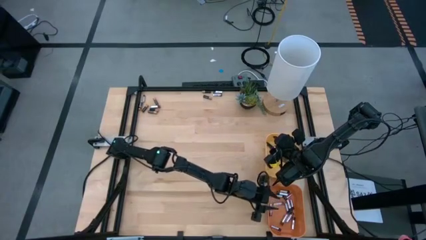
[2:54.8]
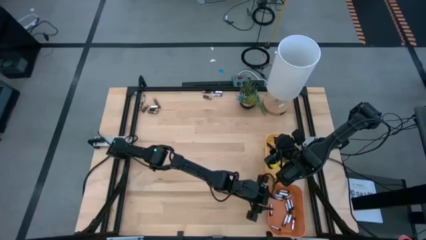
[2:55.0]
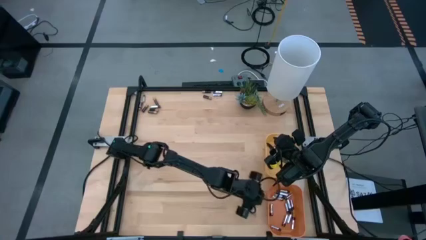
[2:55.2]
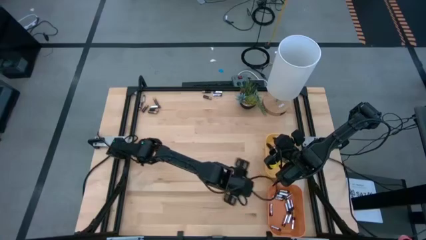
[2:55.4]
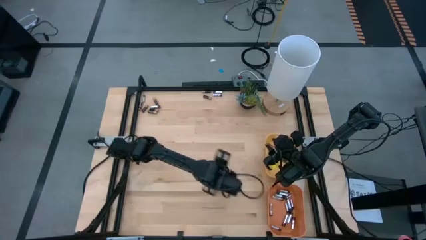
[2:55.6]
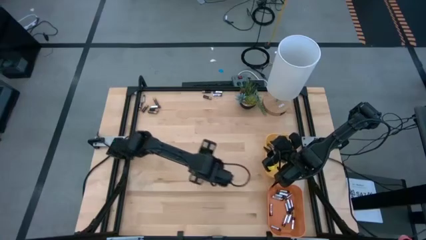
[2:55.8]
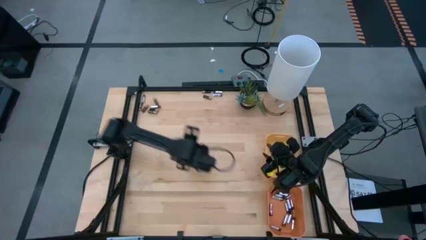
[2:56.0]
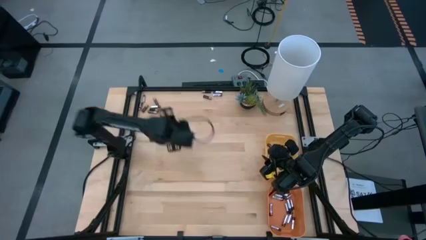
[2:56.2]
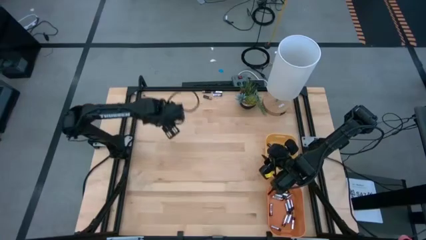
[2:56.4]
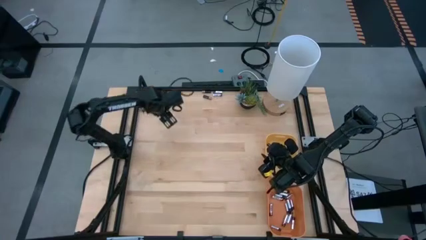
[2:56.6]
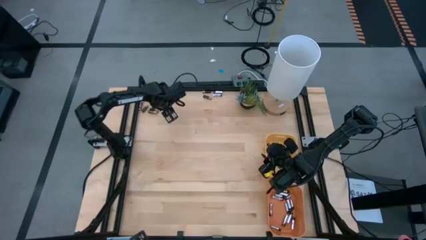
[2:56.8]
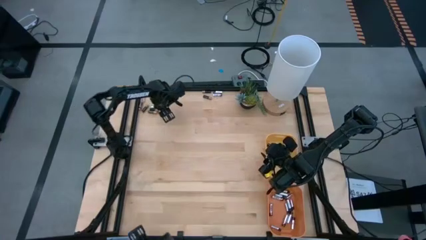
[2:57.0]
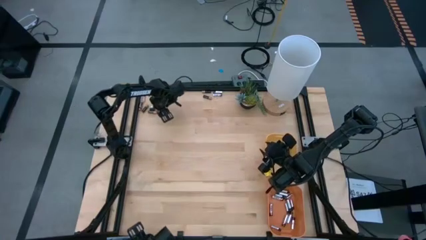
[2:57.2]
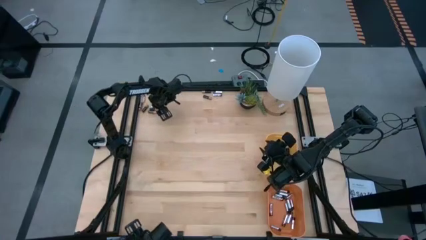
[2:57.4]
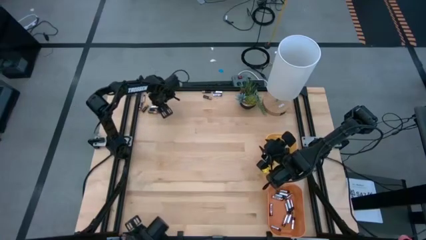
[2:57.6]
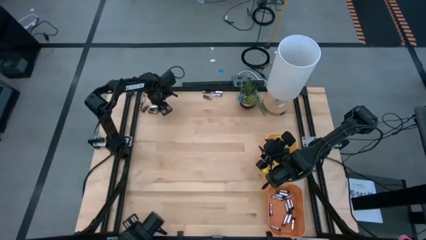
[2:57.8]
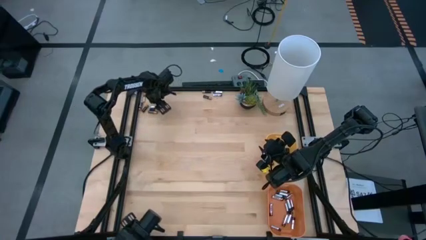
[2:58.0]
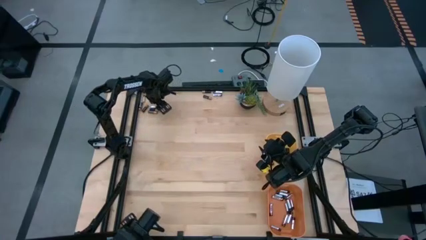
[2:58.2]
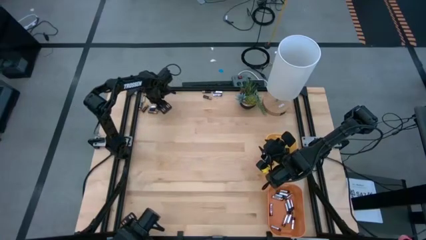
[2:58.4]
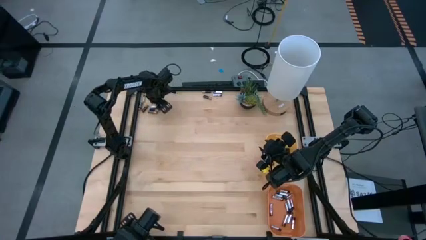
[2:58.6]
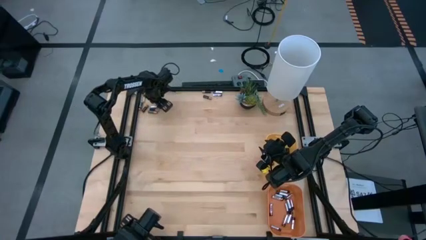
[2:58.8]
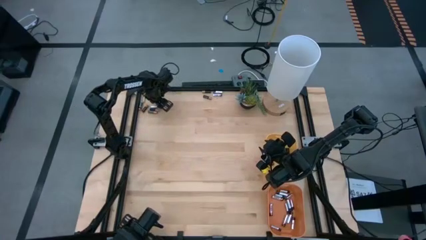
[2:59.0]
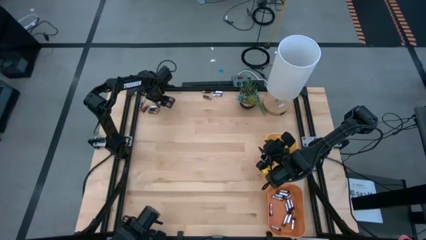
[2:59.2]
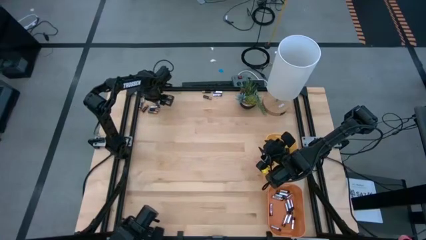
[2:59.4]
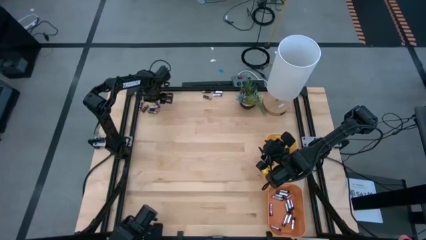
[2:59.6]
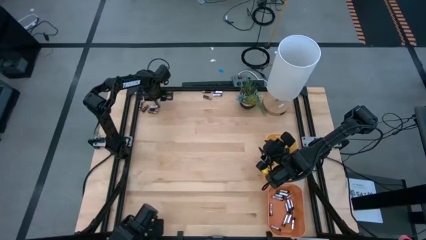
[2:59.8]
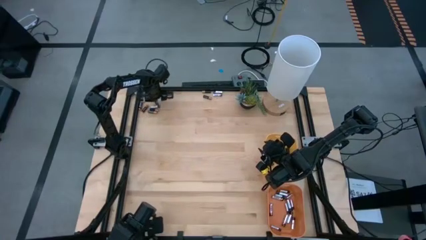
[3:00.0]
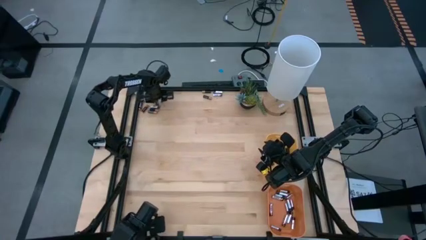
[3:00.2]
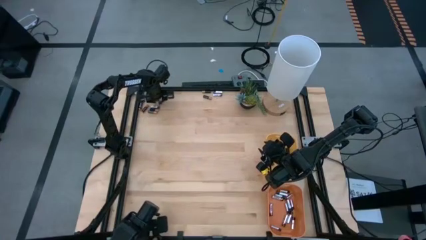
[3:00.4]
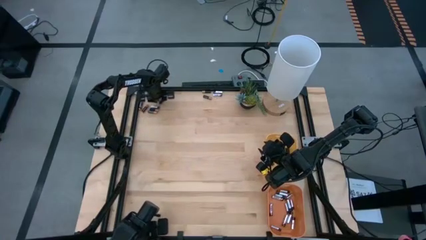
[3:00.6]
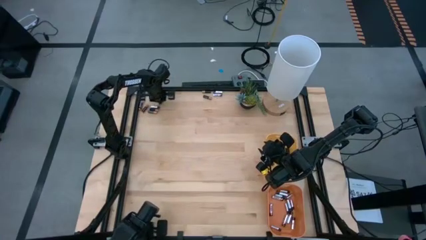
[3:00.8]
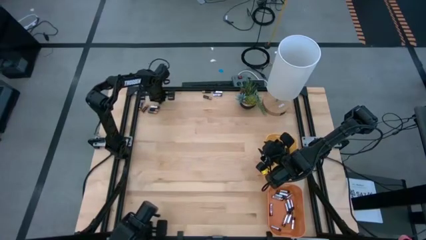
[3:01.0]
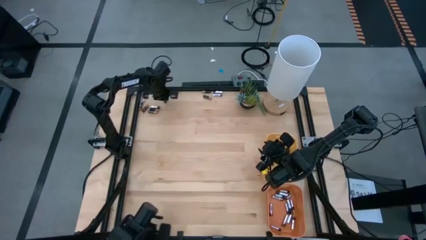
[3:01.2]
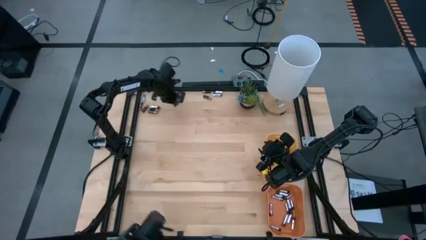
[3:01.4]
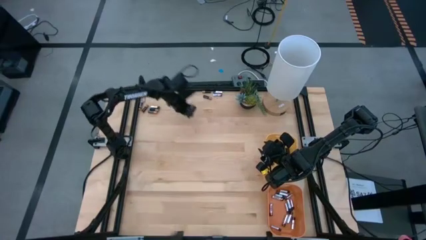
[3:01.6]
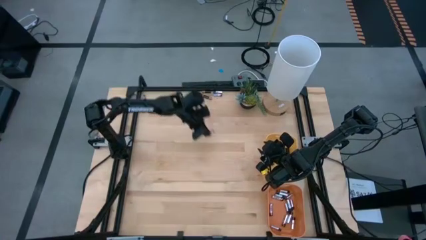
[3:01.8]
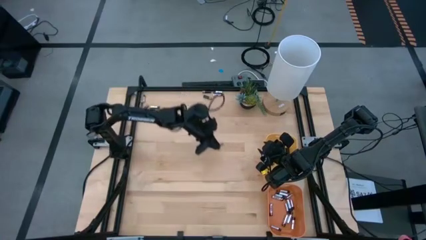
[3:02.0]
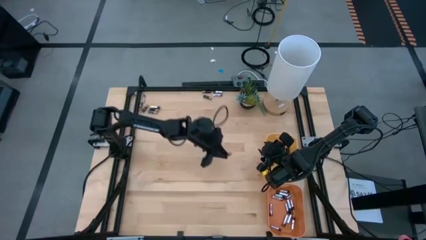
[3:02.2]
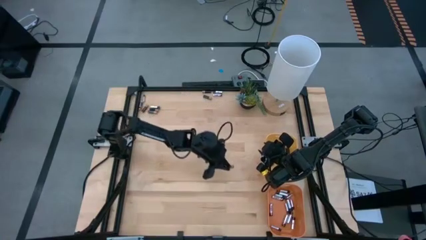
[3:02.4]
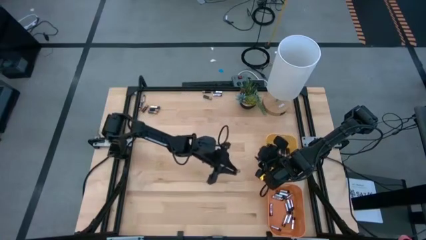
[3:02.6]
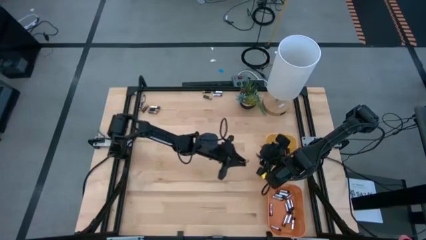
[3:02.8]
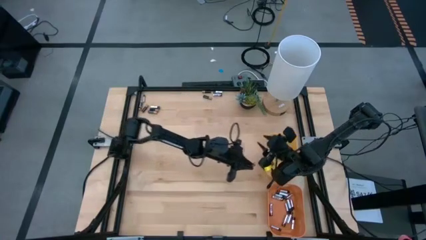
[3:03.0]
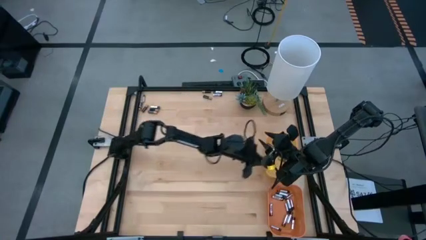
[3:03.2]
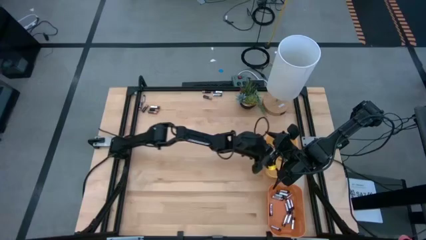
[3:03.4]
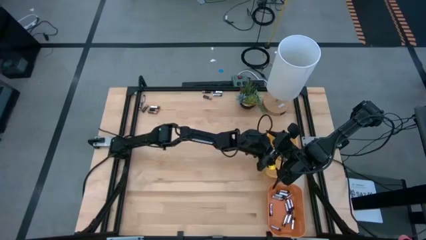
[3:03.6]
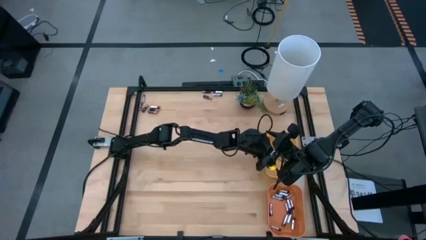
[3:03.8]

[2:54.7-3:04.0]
Task: Sort batteries
Put the brown battery into the yellow bin

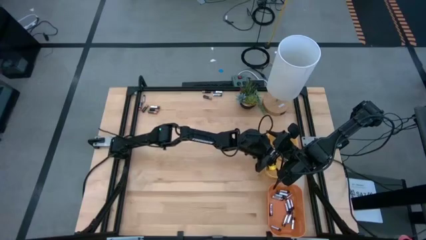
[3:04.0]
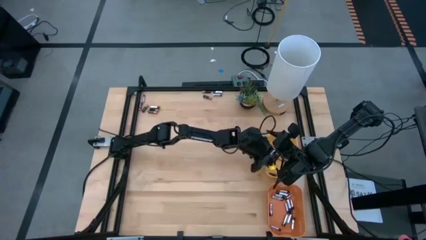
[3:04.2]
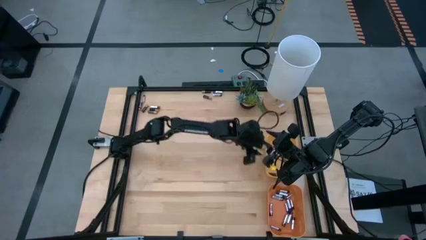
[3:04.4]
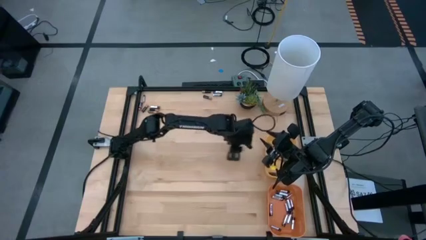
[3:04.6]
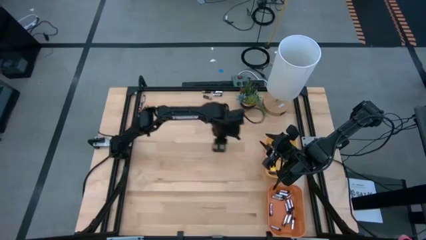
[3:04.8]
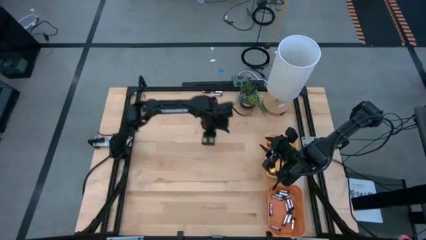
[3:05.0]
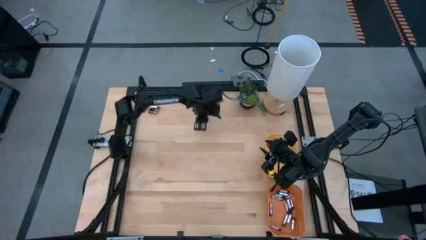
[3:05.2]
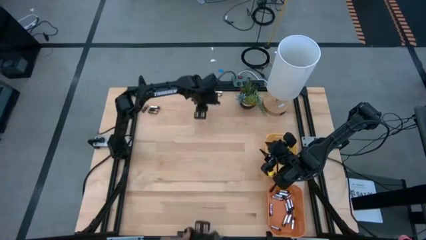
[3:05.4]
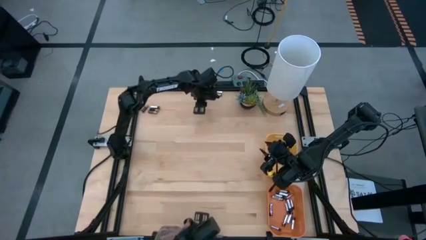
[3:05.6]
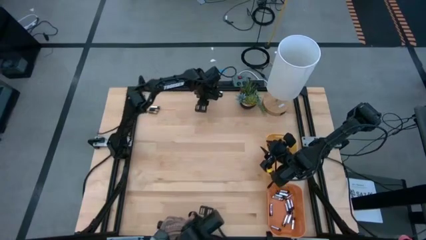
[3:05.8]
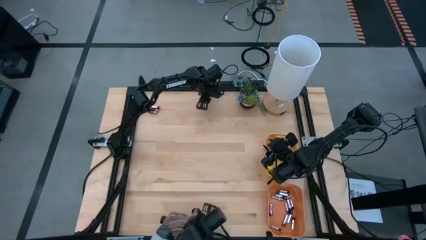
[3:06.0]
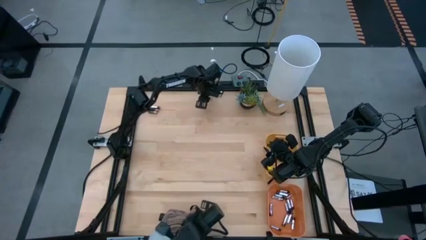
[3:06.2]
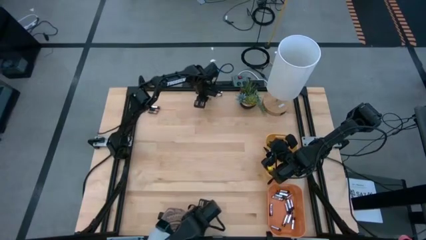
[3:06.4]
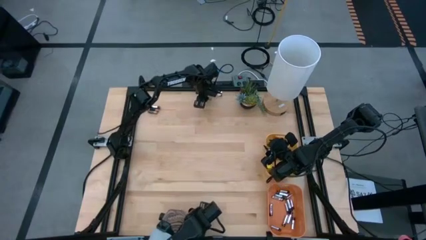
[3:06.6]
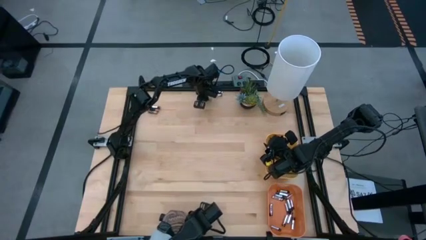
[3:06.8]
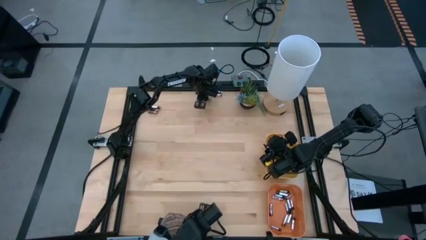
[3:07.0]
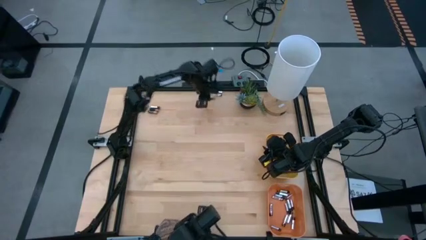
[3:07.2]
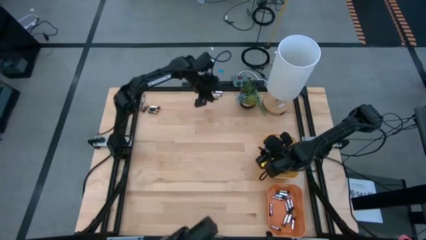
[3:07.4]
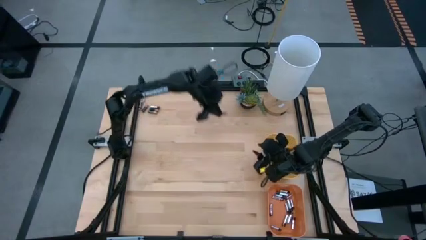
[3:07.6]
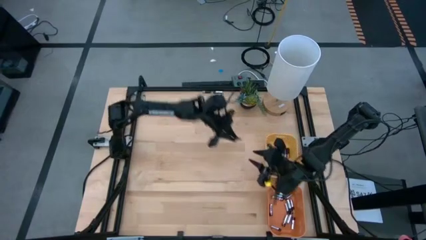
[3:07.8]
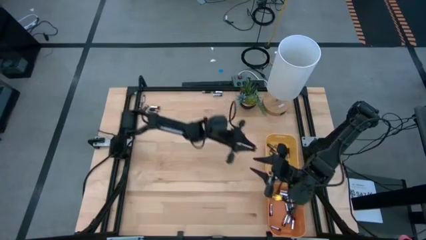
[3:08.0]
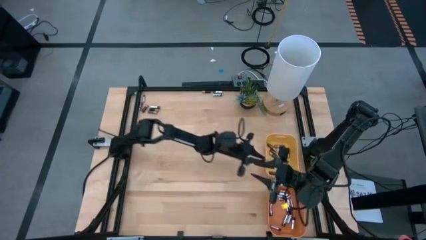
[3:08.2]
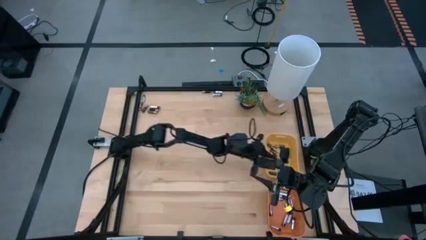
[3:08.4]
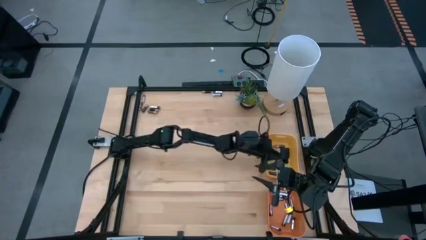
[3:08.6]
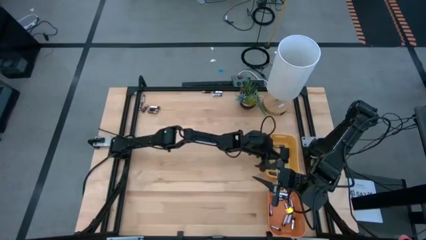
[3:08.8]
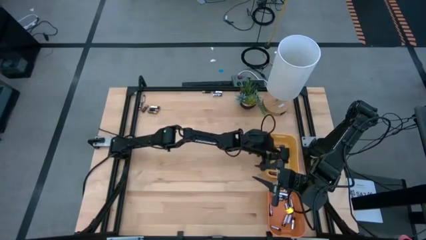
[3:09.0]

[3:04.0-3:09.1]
Put the brown battery into the yellow bin
